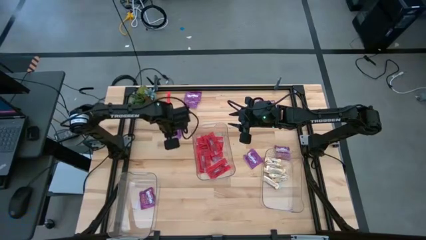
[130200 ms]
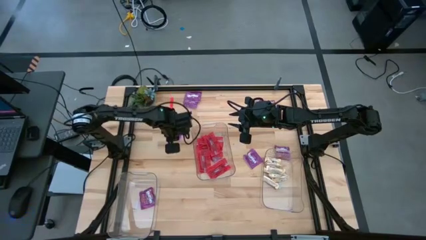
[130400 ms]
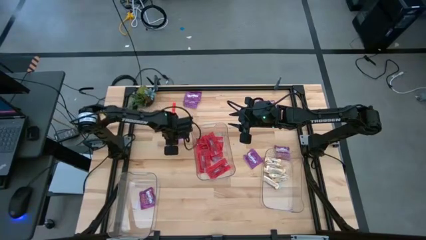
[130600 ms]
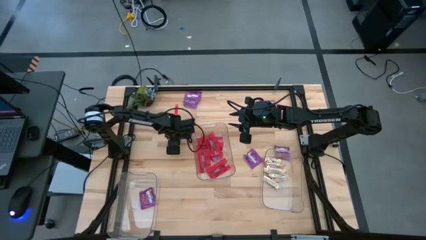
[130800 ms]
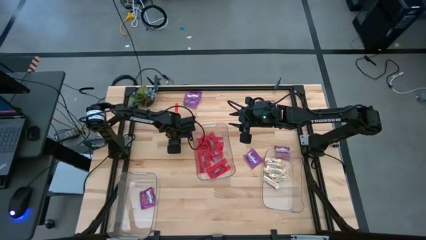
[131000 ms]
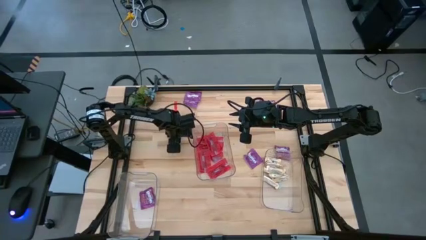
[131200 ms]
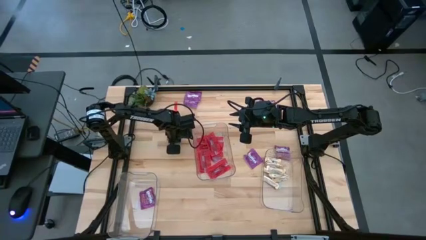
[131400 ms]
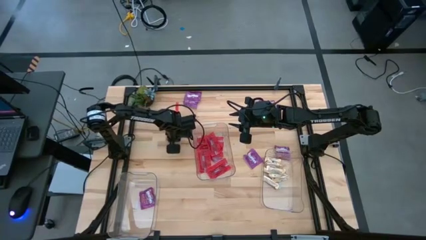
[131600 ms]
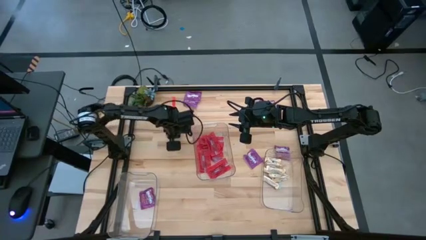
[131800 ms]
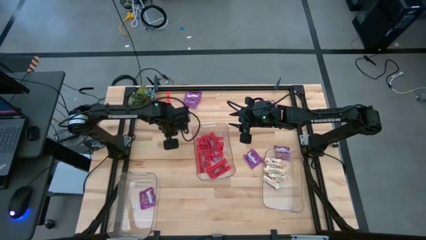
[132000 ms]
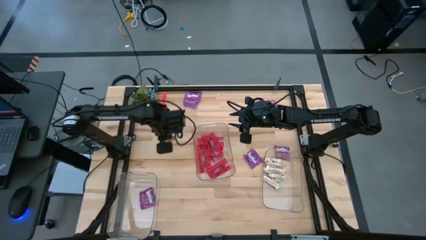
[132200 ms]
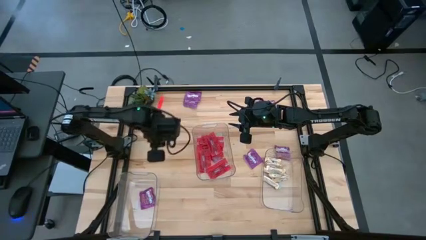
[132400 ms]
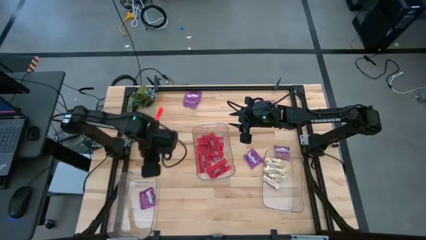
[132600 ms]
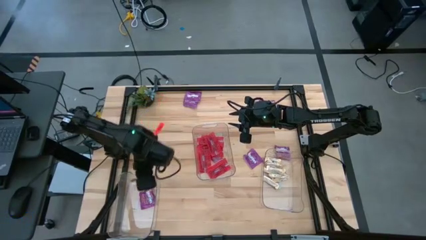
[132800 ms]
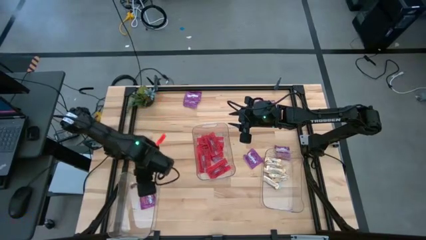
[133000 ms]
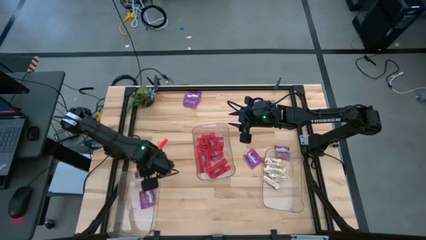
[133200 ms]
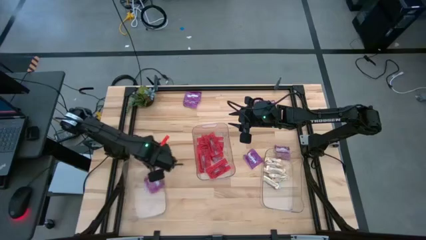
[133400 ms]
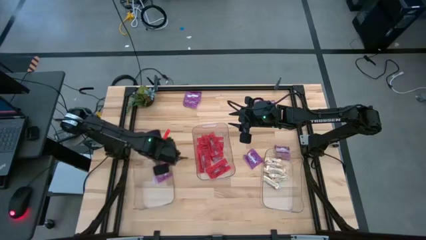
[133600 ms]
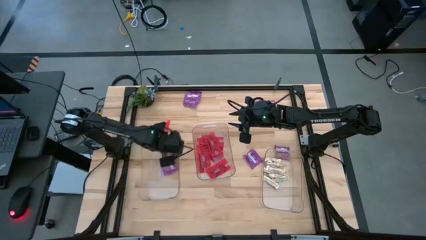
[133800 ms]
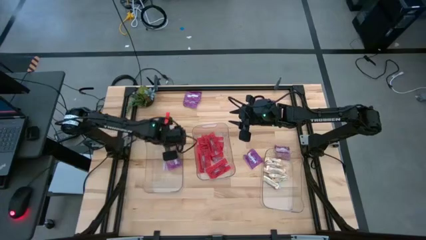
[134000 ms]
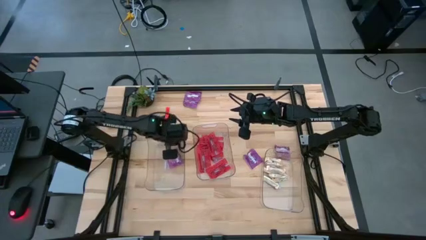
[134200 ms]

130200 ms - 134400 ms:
Task: Sort candy
Put the violet candy pack into the left transparent bin

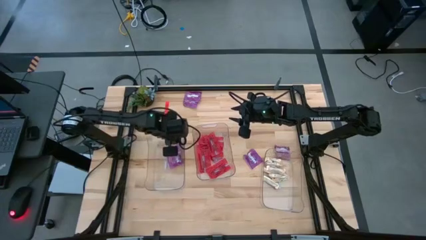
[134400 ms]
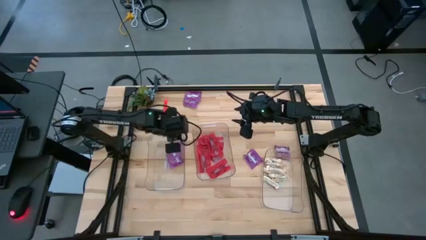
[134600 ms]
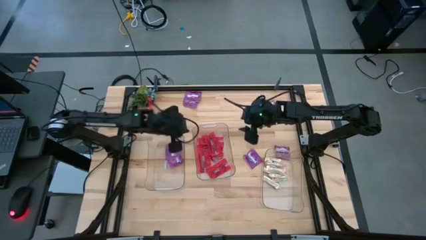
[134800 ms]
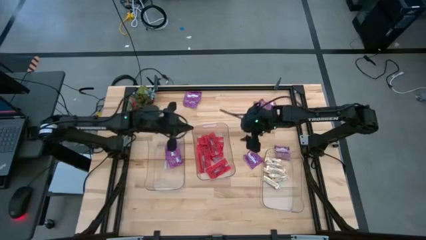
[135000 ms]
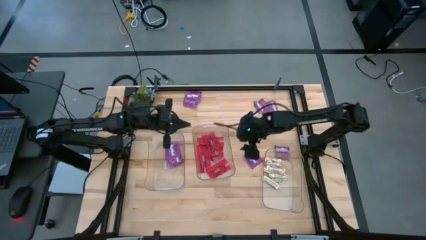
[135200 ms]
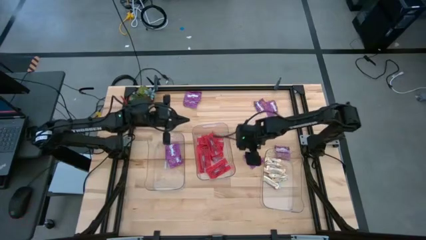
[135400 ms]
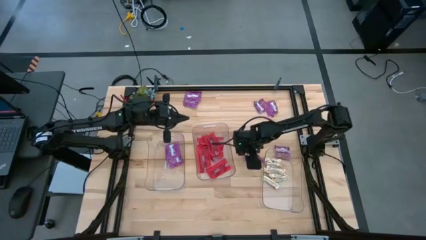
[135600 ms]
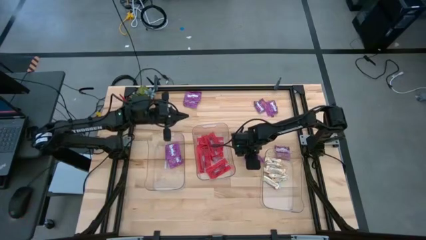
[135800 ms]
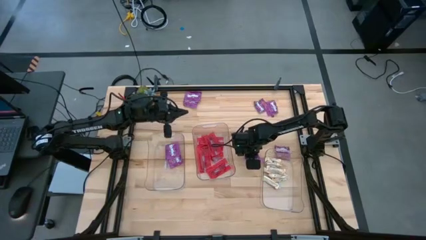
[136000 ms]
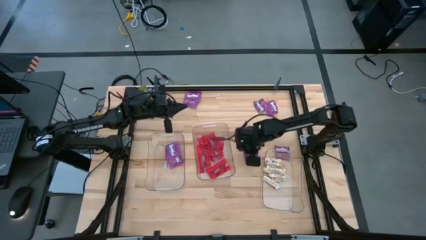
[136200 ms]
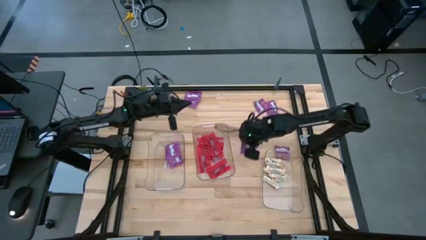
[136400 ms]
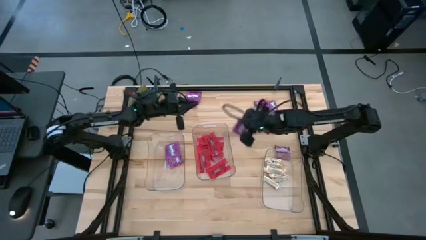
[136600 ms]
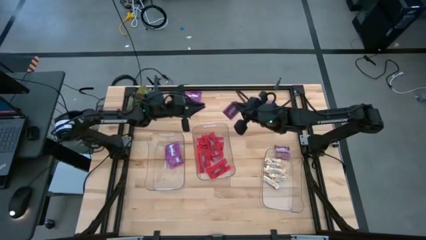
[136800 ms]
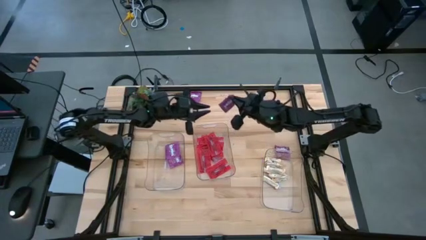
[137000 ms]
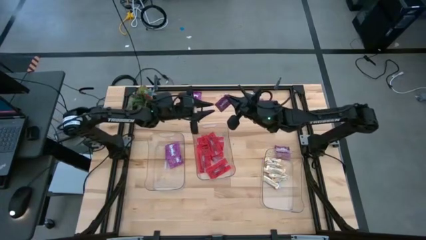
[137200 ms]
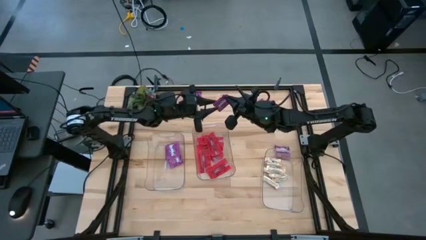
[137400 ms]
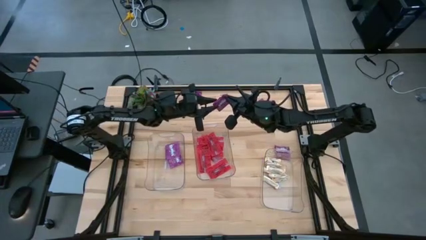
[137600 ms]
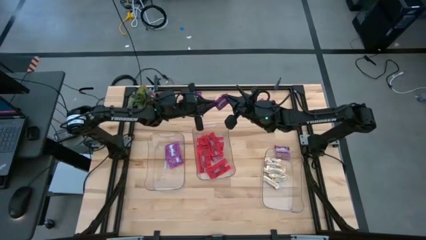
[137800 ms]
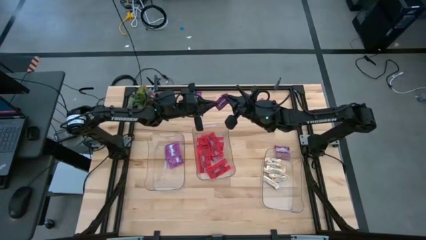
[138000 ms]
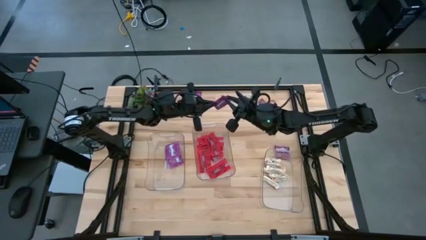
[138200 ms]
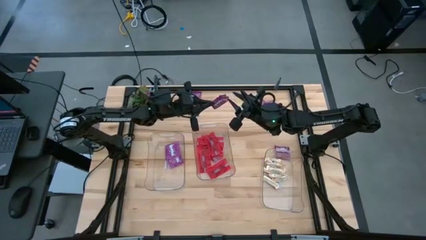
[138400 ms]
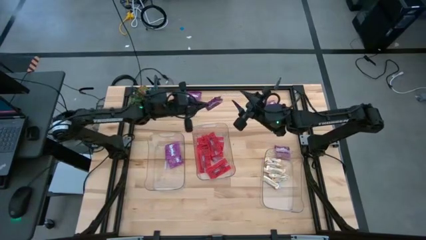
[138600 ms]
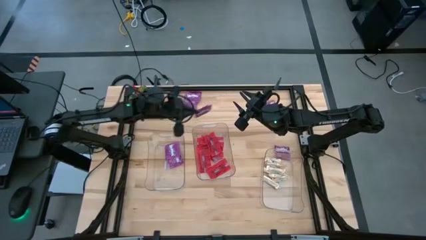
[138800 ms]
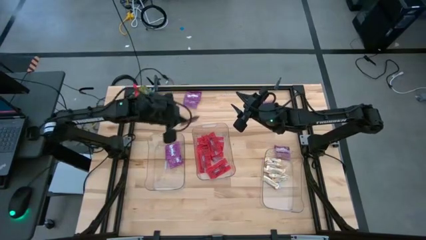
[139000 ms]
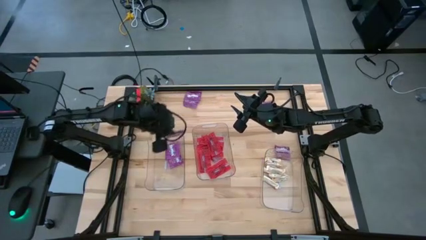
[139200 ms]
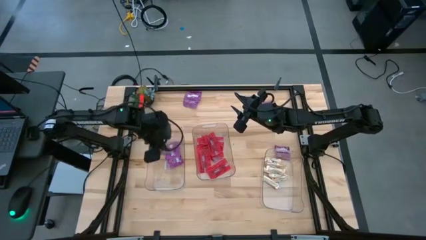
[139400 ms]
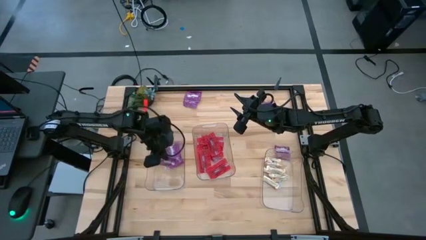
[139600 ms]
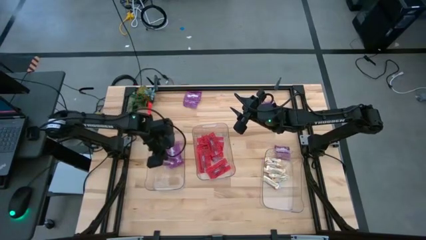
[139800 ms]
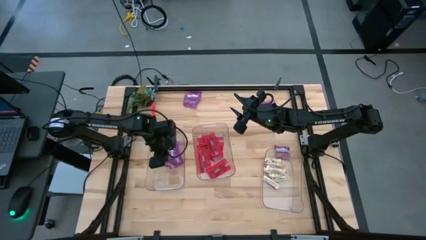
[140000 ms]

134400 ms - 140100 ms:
Put the violet candy pack into the left transparent bin

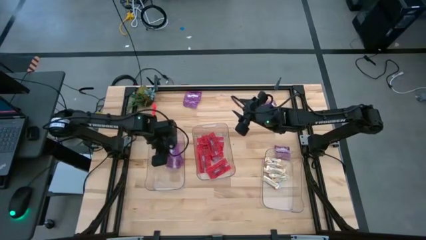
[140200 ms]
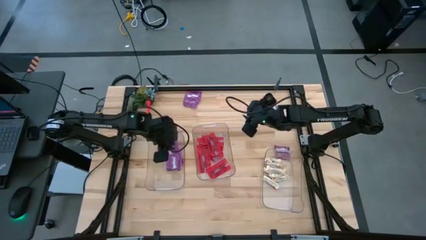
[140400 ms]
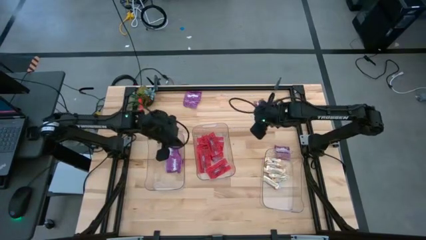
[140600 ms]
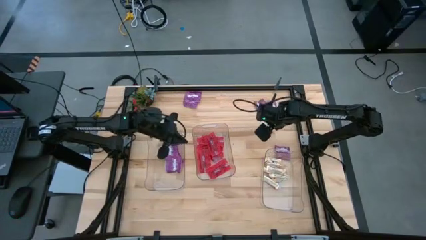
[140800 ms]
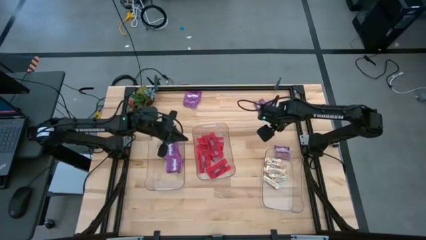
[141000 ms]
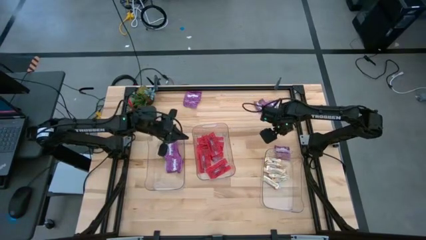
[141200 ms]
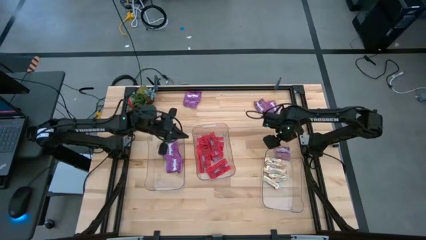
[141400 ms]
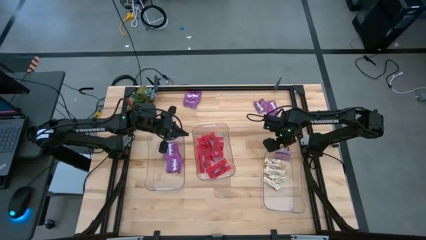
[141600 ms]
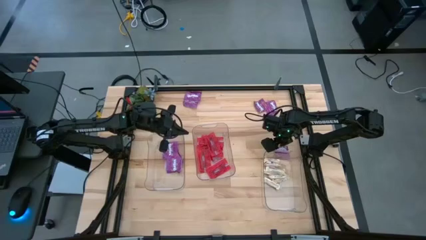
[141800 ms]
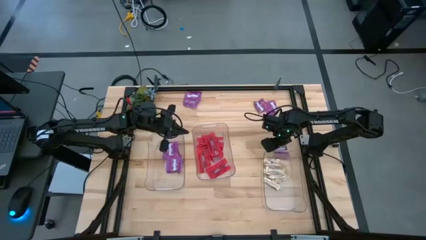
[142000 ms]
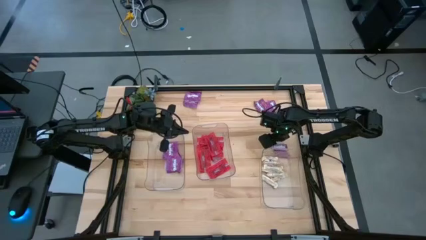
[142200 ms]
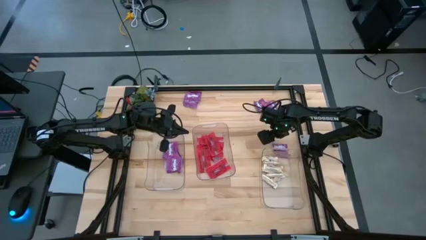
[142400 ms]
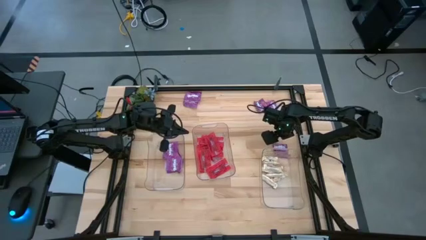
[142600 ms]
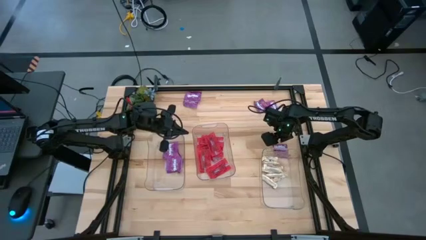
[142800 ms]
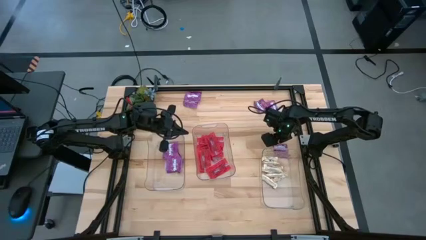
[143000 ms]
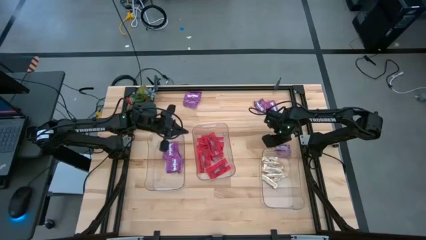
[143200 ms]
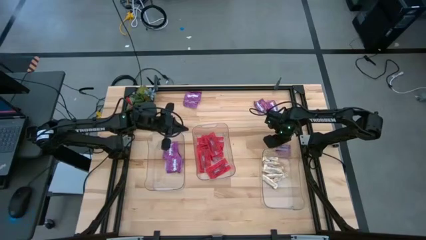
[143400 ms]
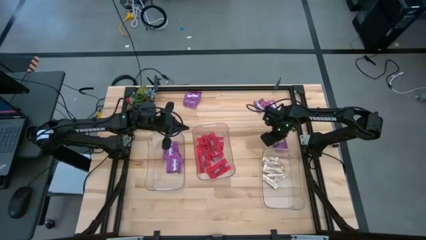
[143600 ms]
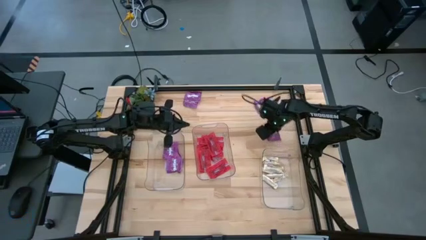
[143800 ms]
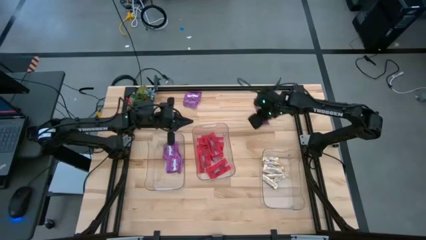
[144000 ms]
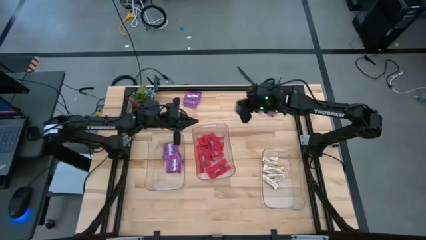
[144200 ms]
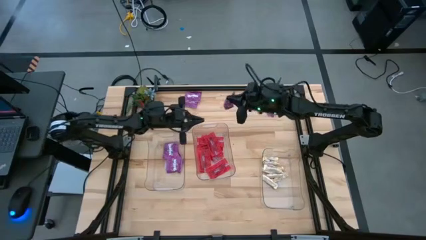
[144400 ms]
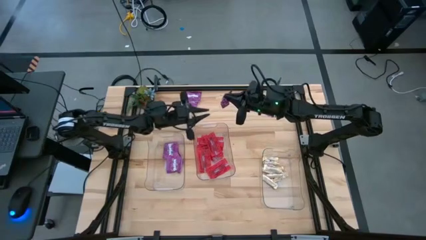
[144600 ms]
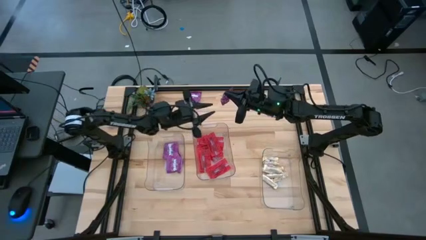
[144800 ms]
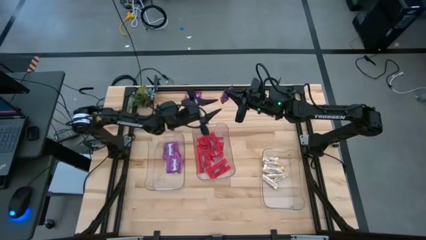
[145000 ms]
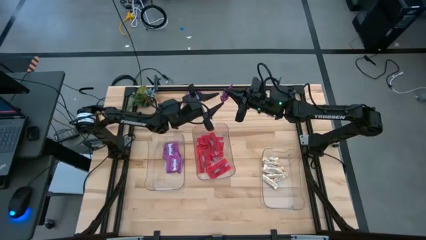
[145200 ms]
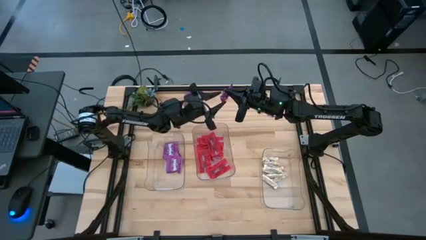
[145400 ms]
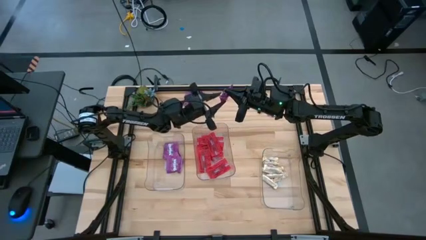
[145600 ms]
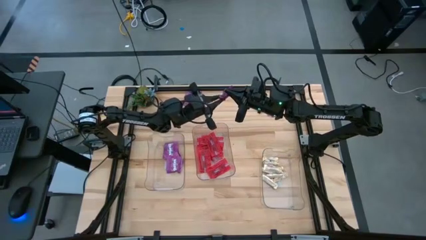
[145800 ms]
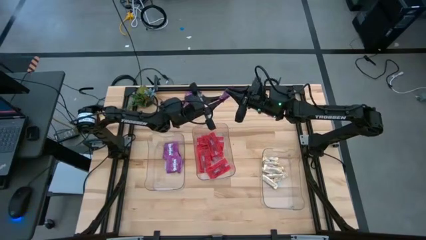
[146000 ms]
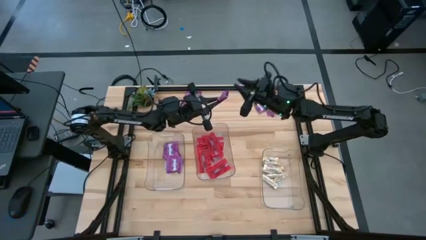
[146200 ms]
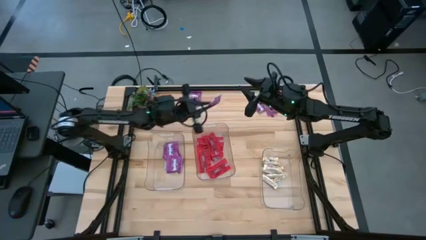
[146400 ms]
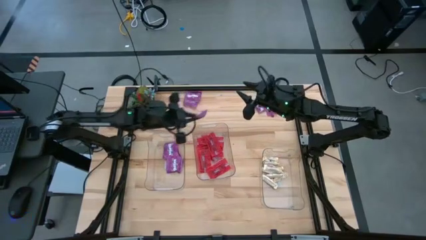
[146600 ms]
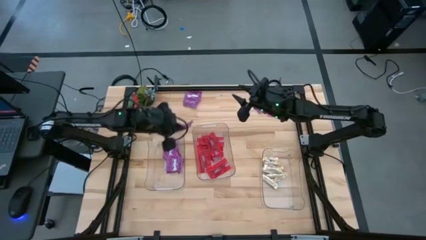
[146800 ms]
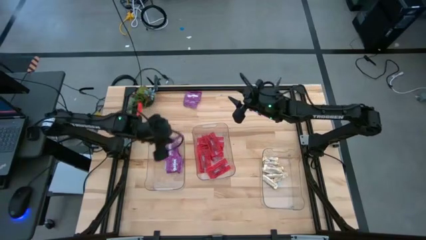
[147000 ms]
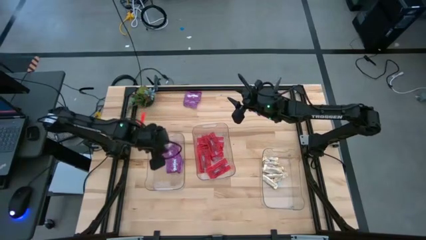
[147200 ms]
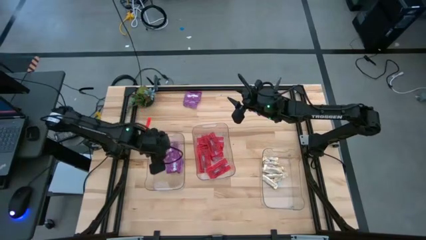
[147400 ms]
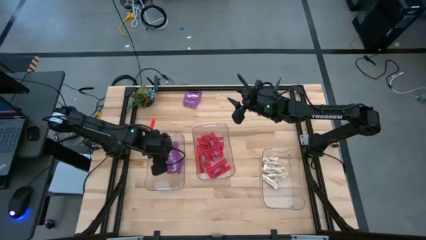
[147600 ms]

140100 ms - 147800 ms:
Put the right violet candy pack into the left transparent bin
